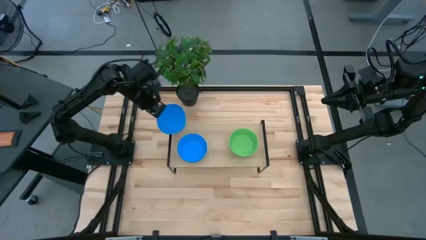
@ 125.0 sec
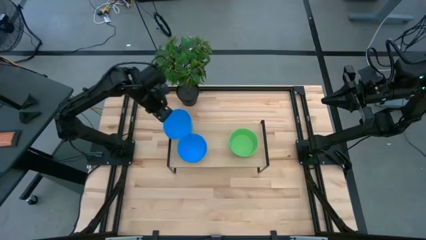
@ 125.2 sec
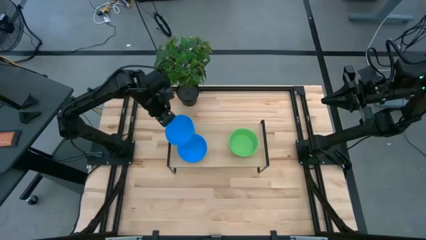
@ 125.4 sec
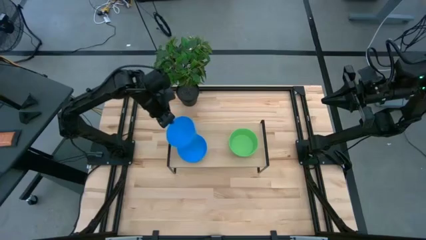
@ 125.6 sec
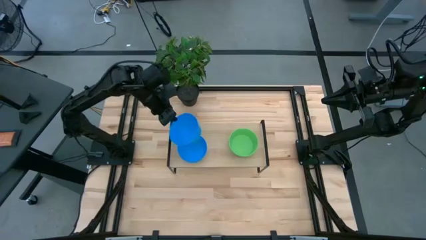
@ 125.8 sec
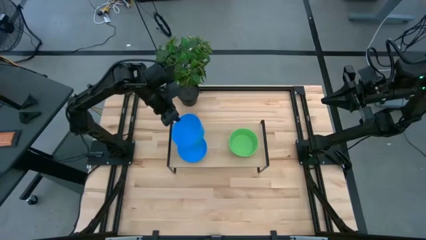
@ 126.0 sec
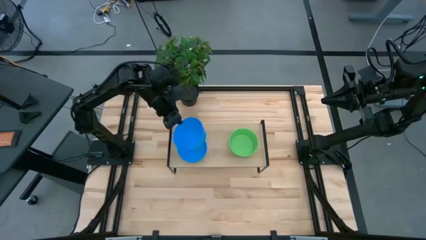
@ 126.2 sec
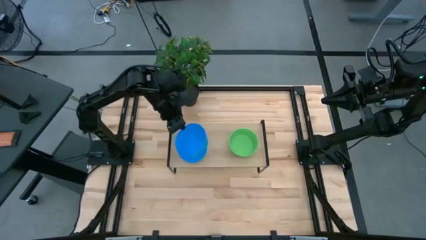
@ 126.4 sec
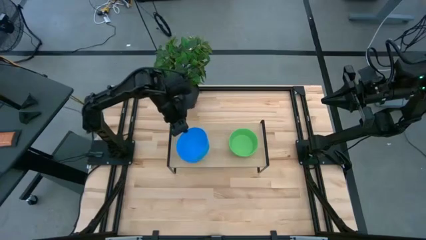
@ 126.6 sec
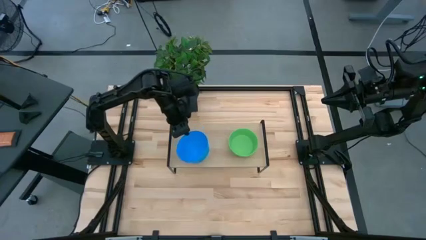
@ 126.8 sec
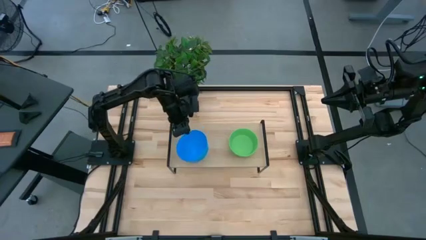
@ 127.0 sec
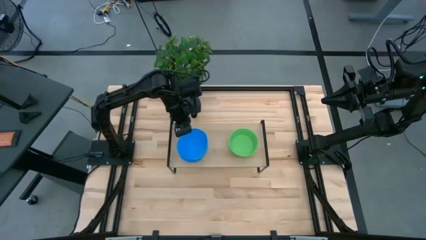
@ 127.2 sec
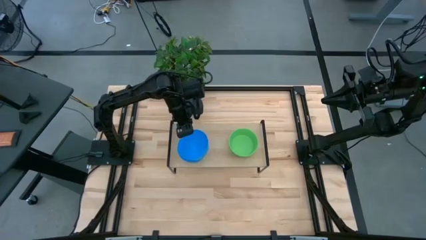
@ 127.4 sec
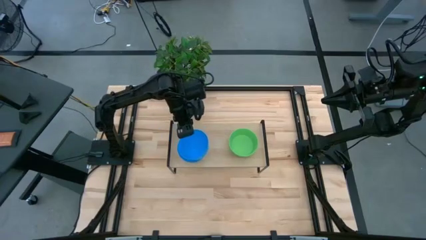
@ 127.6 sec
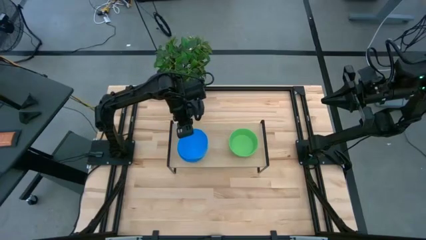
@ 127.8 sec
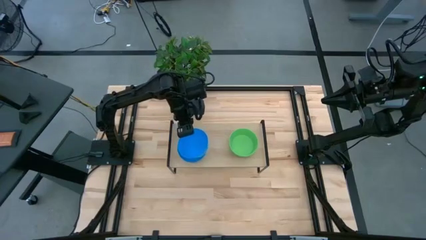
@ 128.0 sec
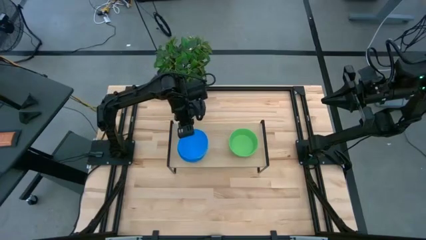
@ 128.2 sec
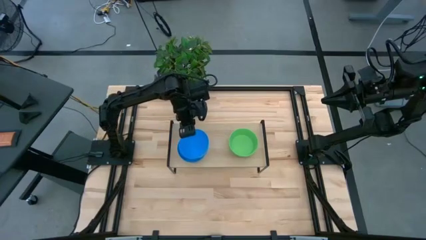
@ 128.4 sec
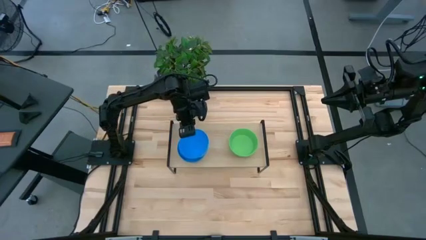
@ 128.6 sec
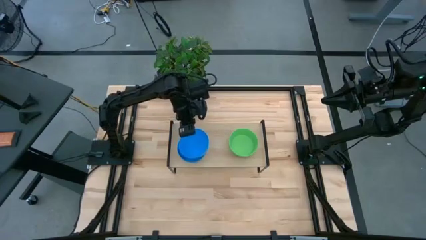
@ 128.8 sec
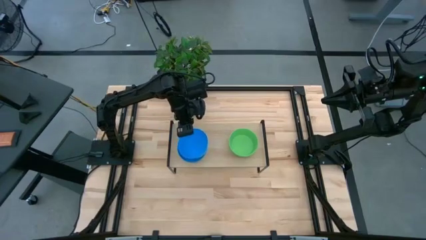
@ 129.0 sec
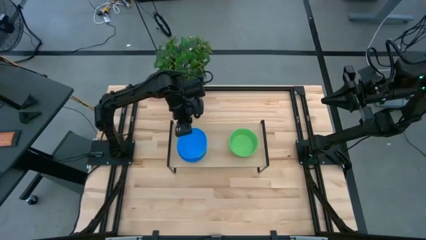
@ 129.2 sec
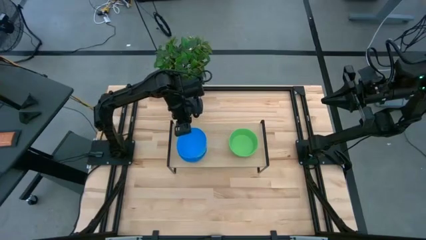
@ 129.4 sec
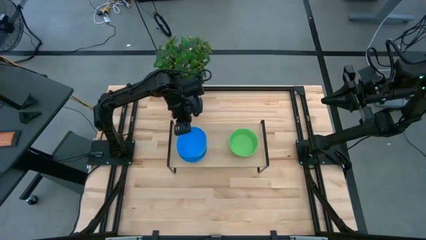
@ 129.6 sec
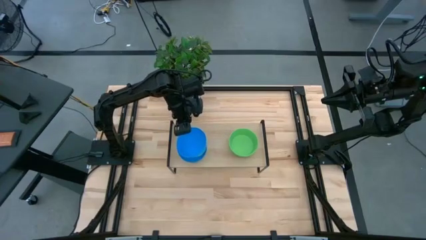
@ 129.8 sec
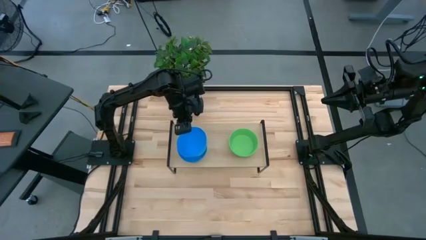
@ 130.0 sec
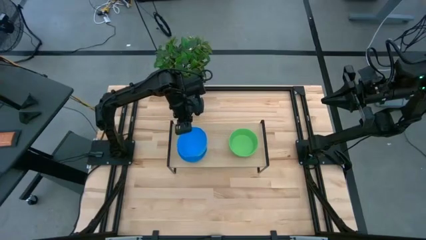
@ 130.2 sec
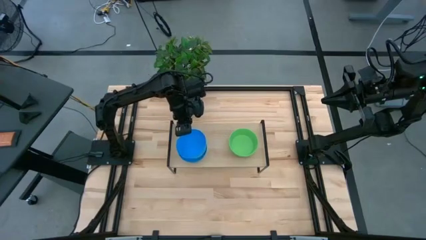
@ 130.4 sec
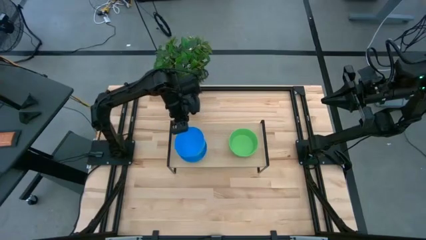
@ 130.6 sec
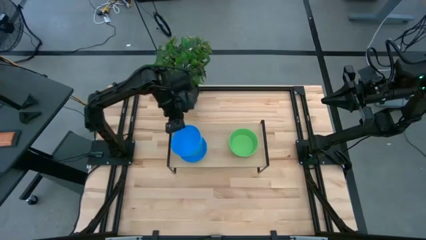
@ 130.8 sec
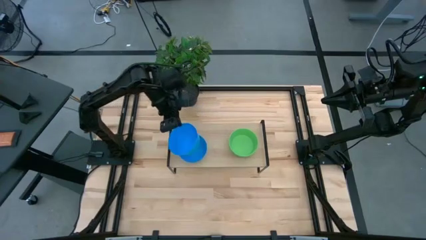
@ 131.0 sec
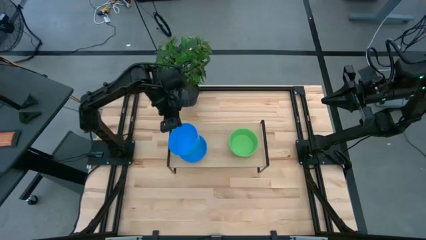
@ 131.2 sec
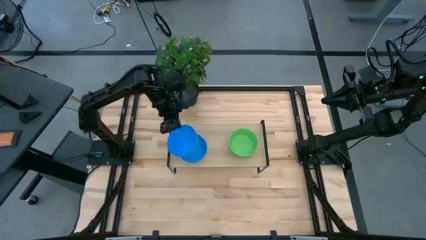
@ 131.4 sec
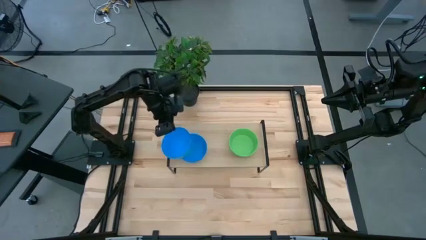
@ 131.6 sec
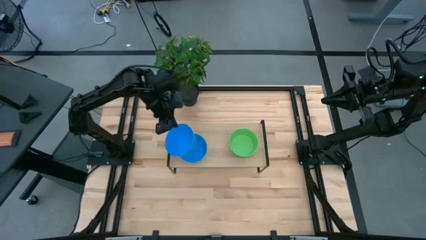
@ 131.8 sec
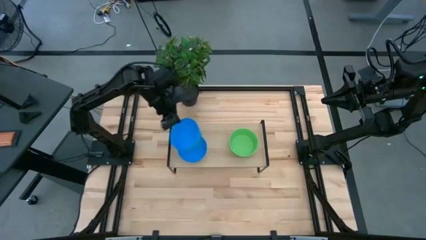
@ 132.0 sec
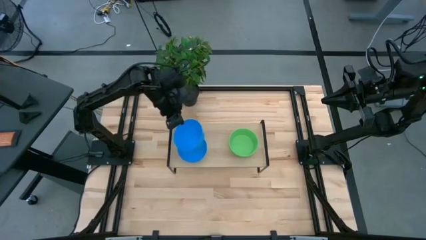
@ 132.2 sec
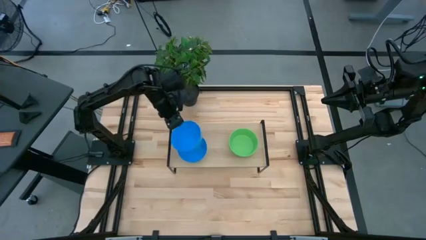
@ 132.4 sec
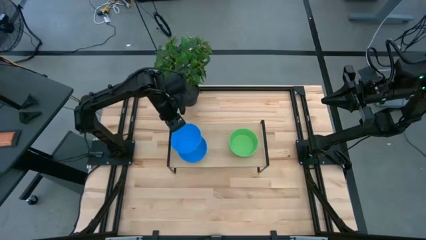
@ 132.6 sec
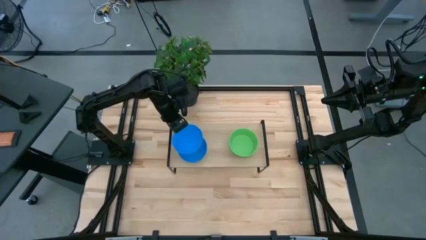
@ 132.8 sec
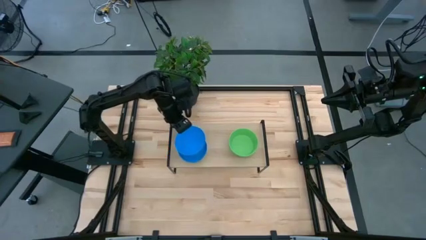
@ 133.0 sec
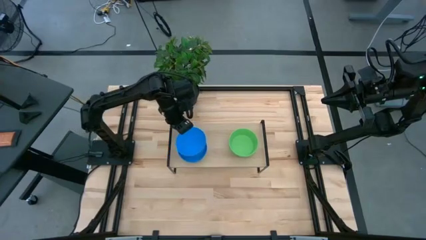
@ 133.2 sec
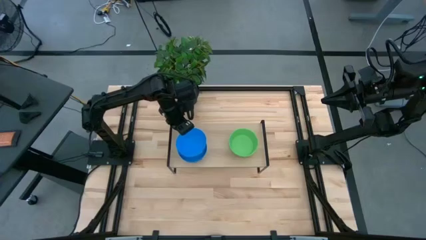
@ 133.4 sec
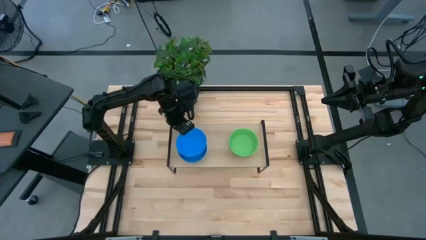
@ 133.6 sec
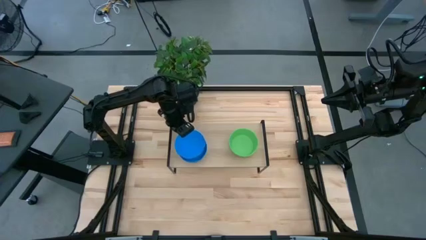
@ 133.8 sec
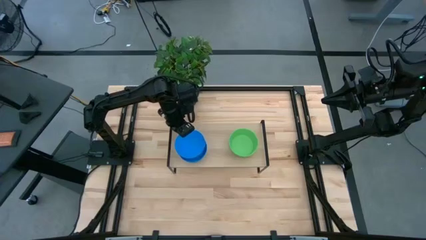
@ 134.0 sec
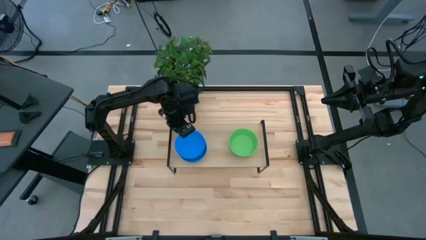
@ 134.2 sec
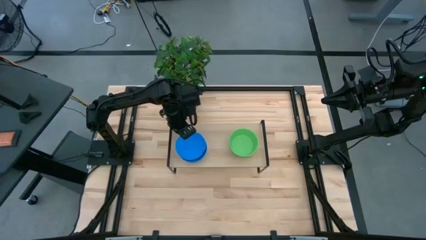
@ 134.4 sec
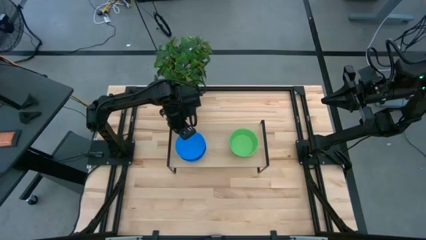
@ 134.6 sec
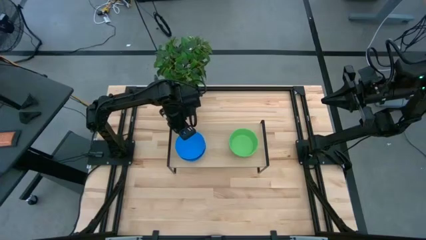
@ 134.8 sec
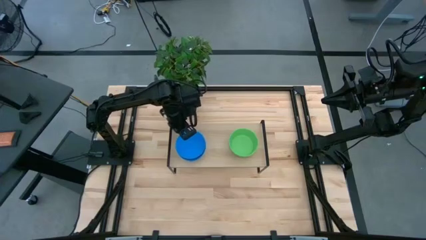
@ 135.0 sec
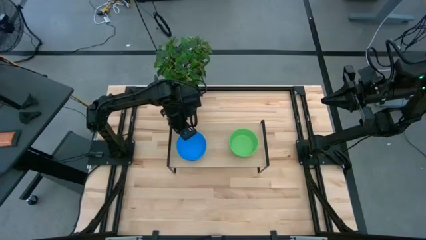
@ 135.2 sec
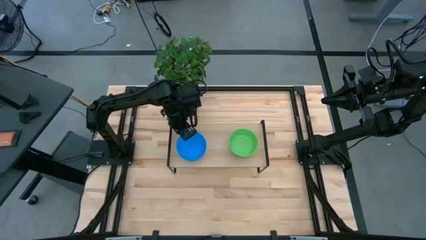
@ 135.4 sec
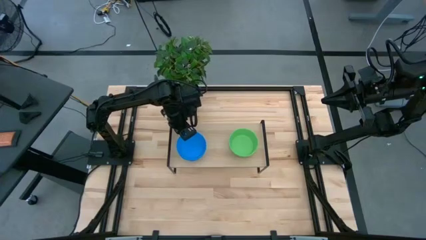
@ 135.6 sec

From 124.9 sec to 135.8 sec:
Task: Pick & Place Mini bowls
Stack the blue bowl on the blue bowls on the shelf
